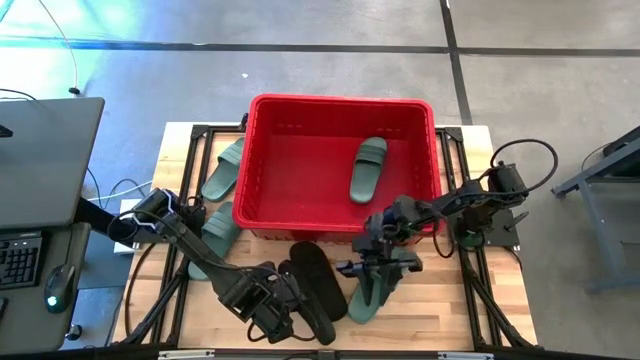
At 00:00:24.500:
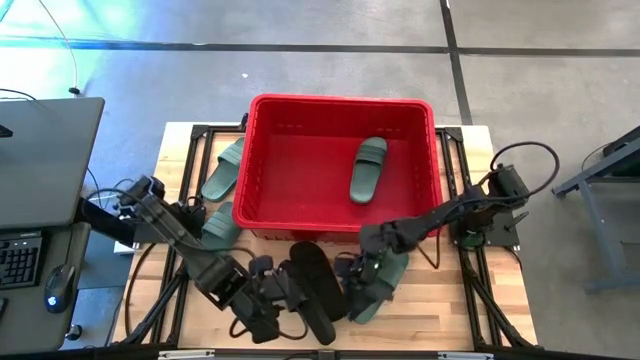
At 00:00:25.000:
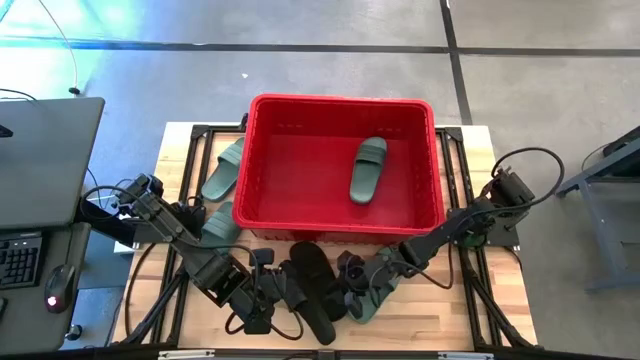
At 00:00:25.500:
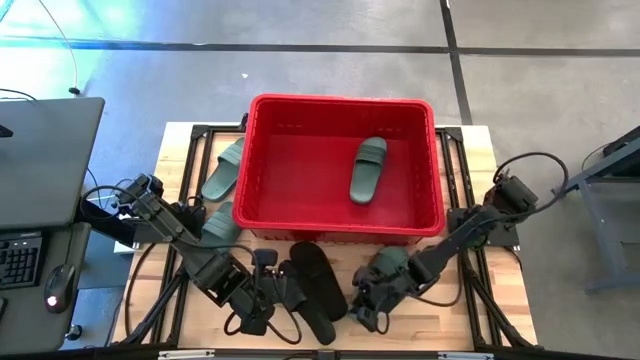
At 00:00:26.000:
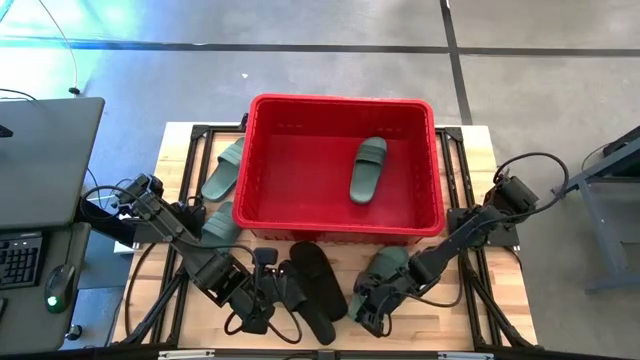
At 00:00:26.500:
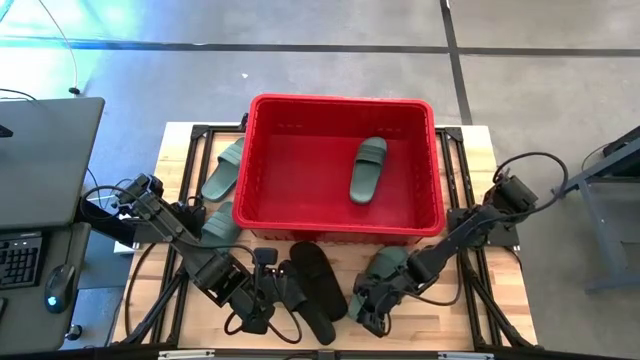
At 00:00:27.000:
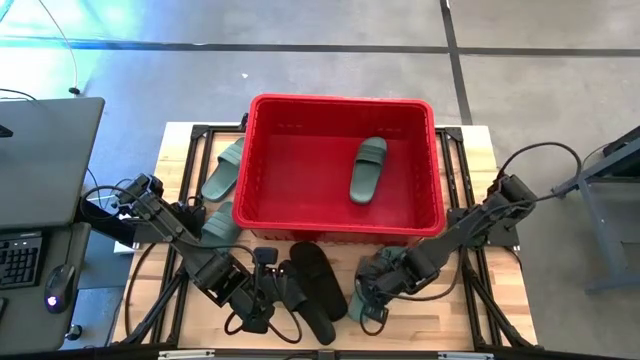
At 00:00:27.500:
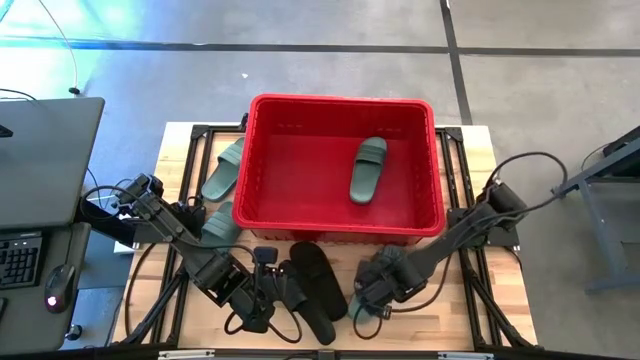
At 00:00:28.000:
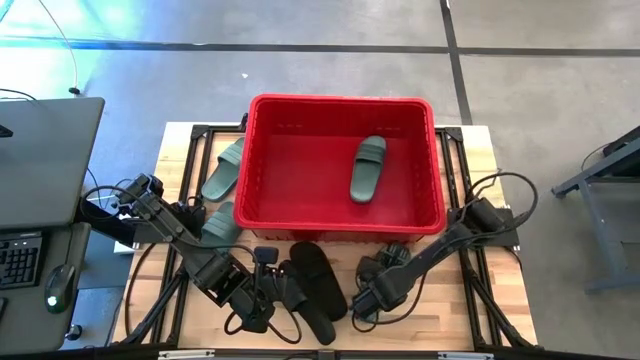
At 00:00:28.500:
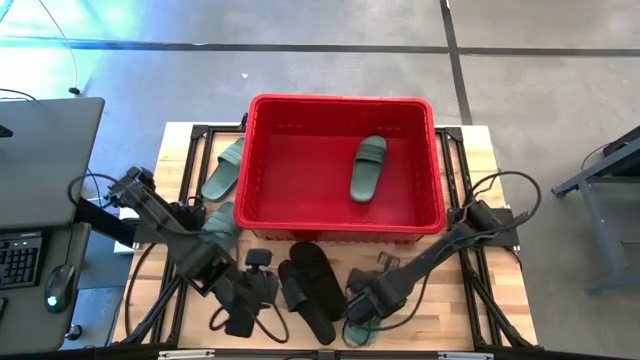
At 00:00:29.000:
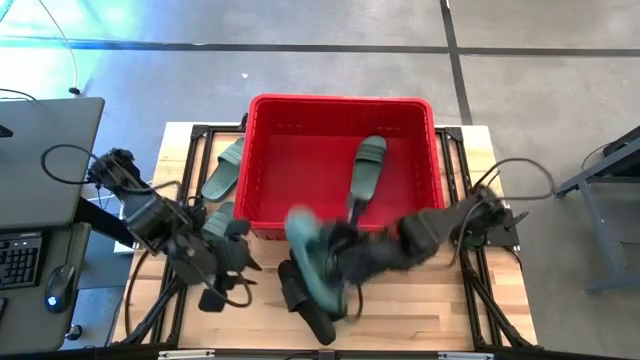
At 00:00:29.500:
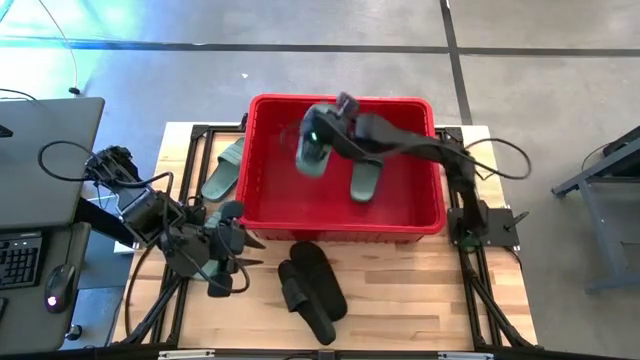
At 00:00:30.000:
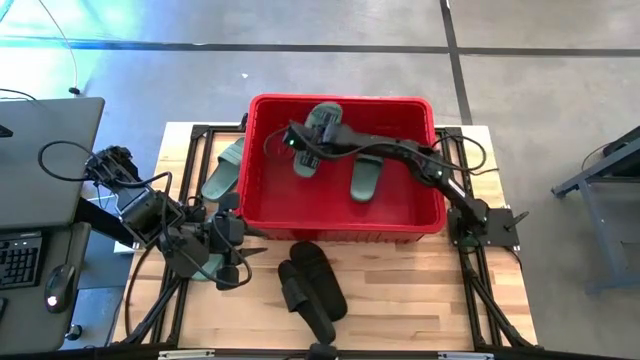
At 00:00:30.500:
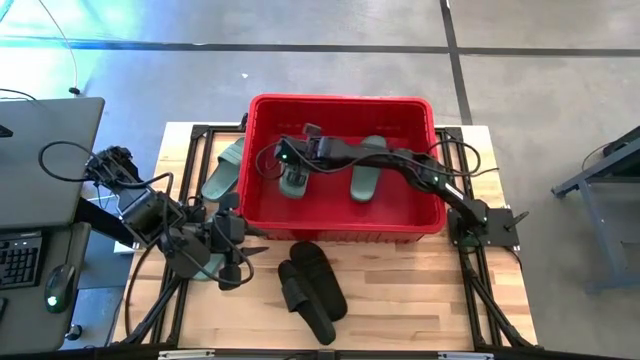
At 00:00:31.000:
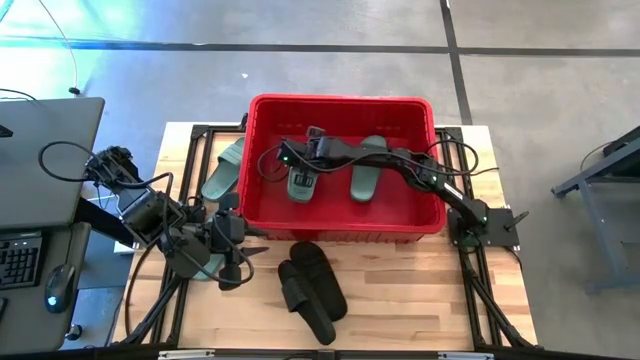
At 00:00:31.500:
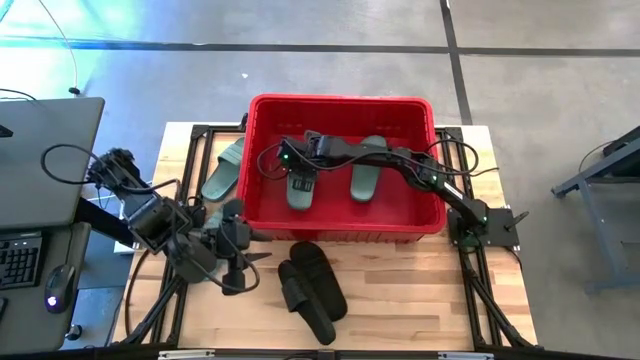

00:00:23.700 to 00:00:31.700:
Task: Pick and place slides into bin
Put the green slide into the red bin

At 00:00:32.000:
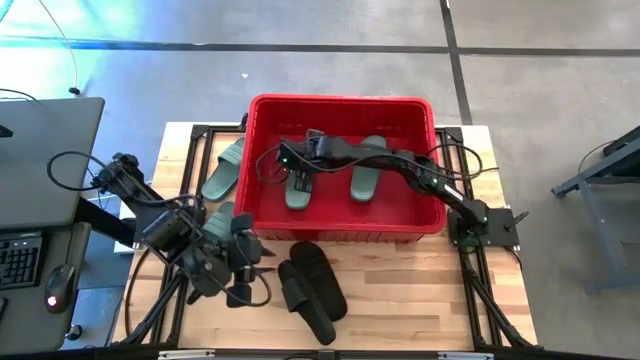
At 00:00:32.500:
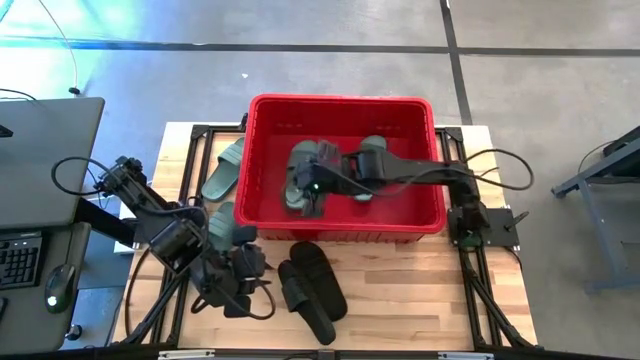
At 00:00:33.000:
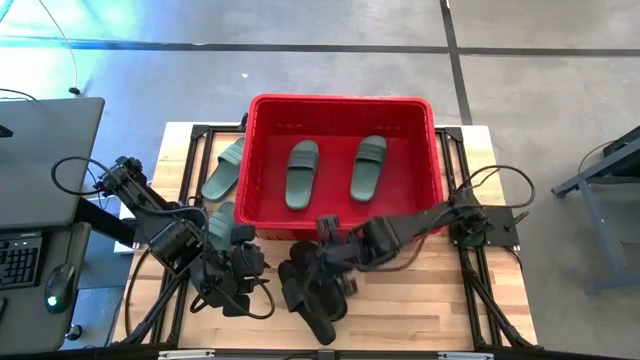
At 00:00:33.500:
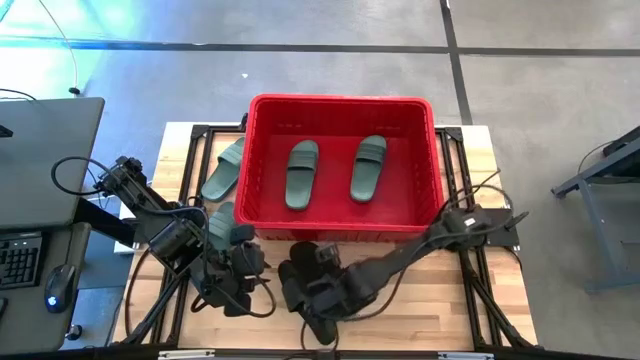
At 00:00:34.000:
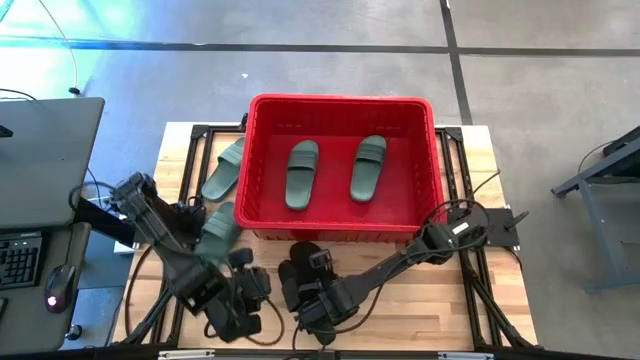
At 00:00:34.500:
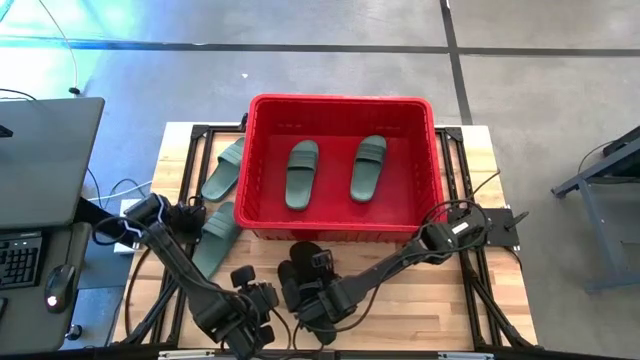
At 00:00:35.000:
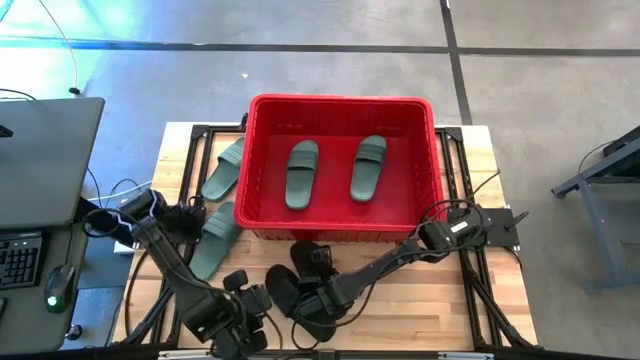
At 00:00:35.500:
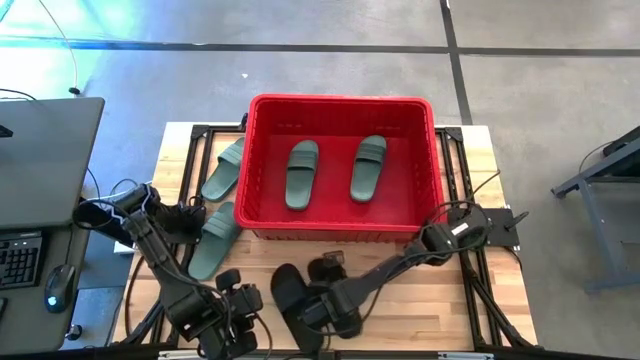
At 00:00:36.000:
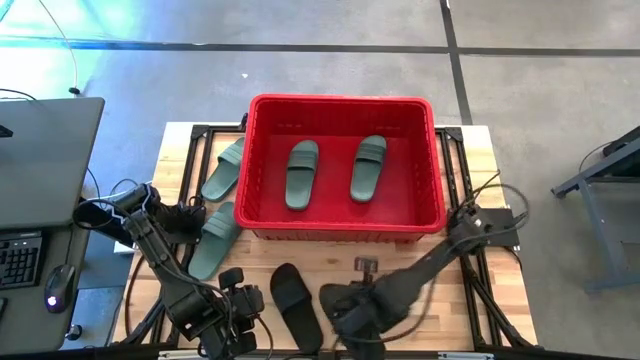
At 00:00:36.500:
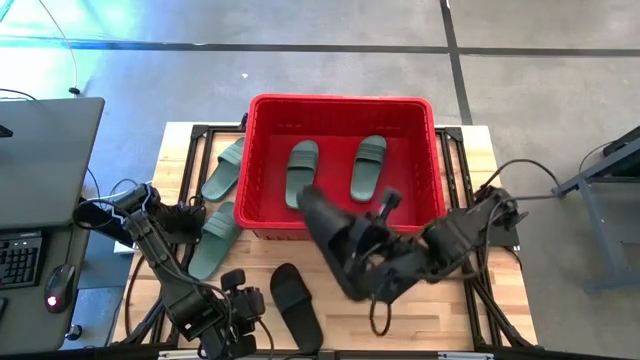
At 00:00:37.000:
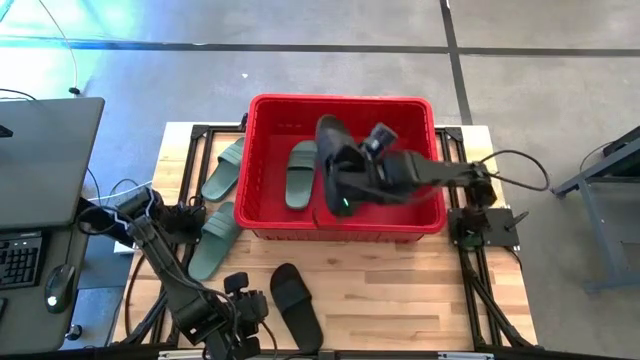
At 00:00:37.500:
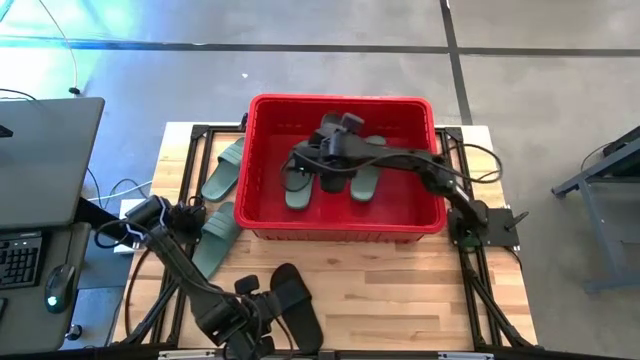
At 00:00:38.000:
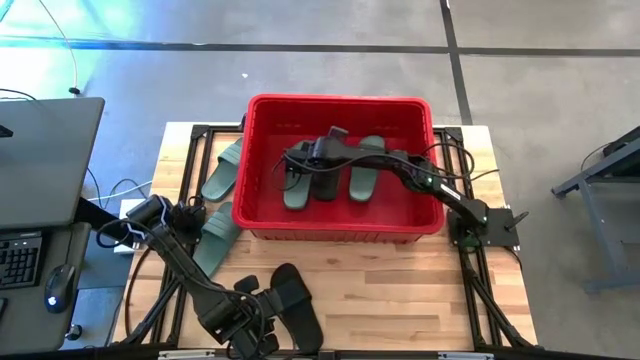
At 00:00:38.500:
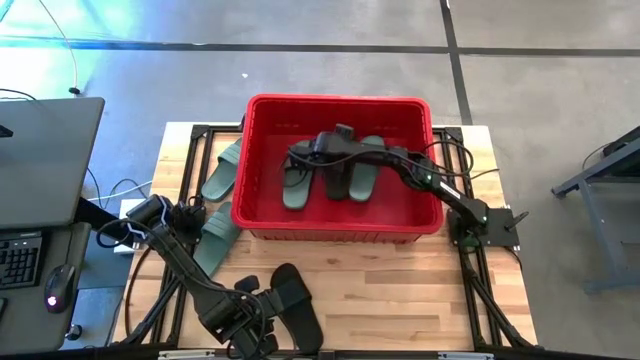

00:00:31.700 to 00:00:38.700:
Put the black slide into the red bin

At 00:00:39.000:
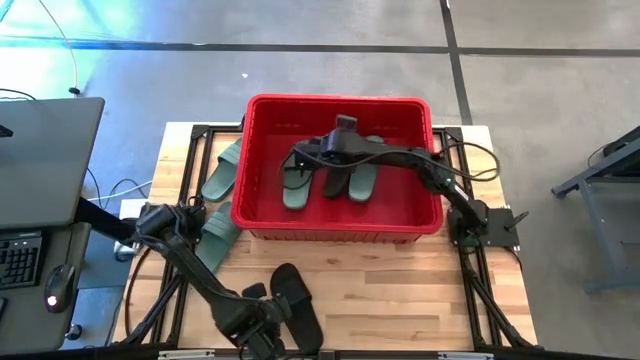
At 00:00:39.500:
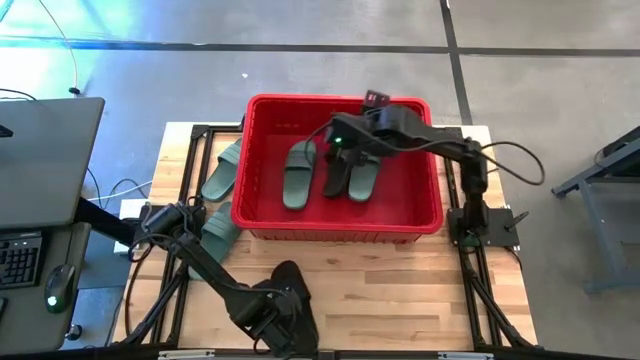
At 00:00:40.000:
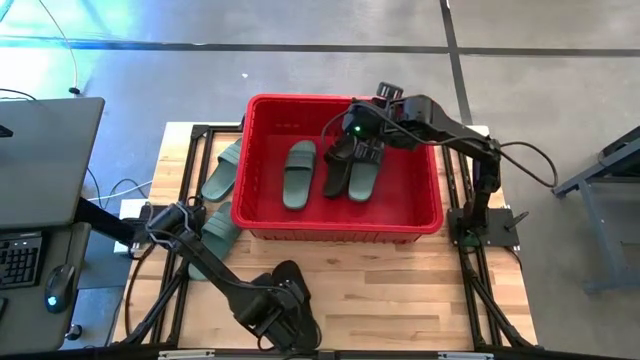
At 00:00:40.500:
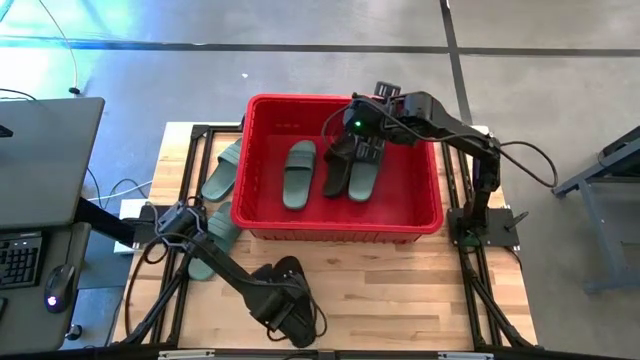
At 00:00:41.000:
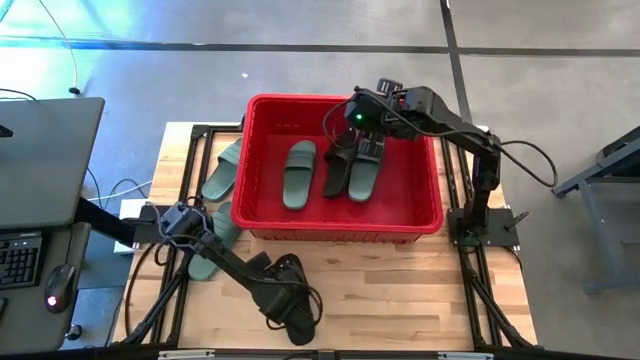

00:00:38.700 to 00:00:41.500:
Put the black slide into the red bin

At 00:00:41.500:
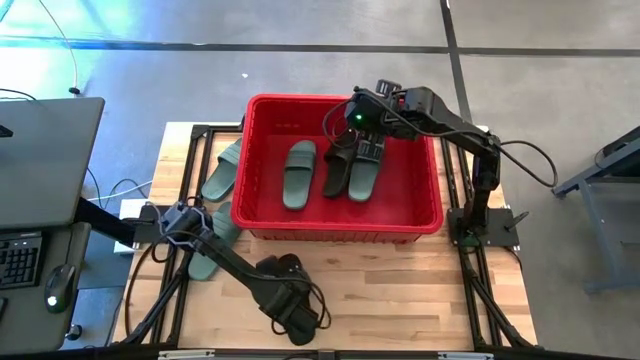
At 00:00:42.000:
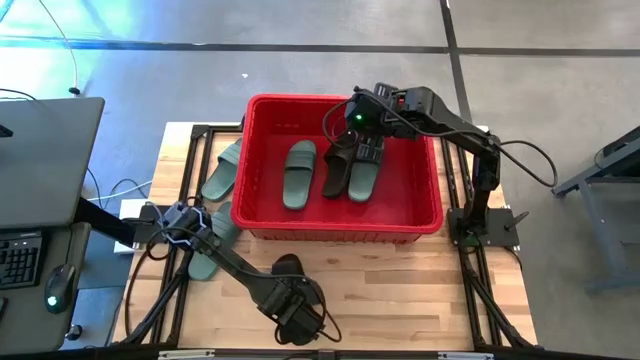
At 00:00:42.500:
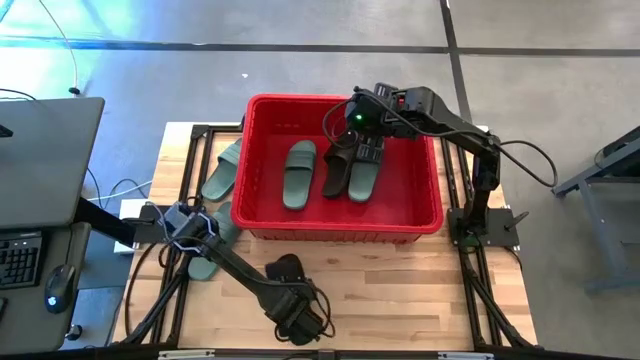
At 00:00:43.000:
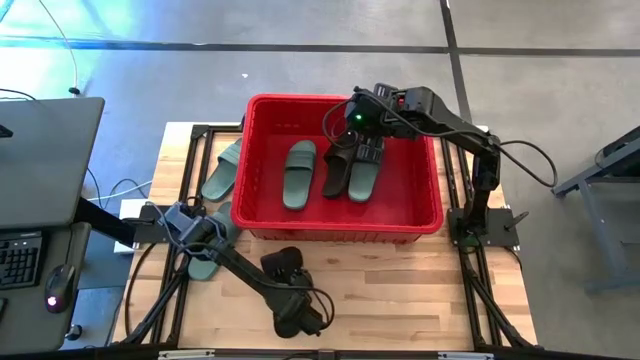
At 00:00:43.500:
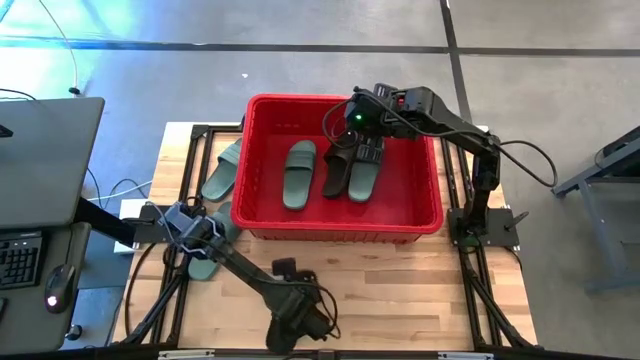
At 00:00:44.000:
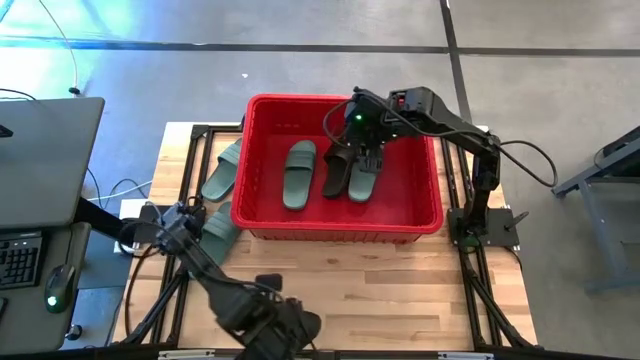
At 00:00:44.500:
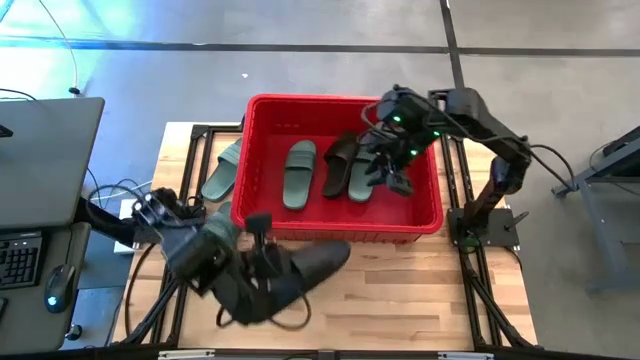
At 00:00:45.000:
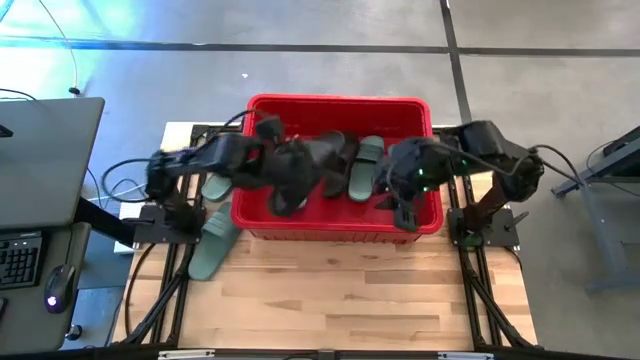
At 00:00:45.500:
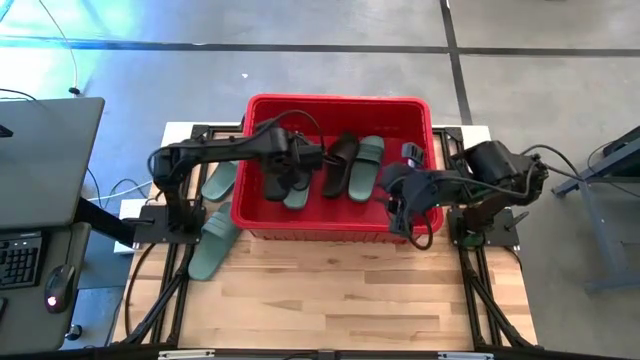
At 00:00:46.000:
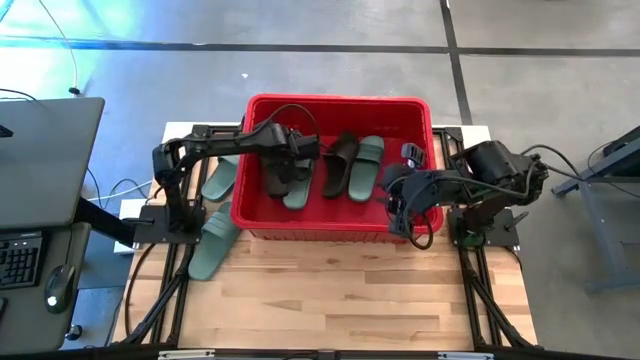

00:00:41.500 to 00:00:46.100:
Put the black slide into the red bin
